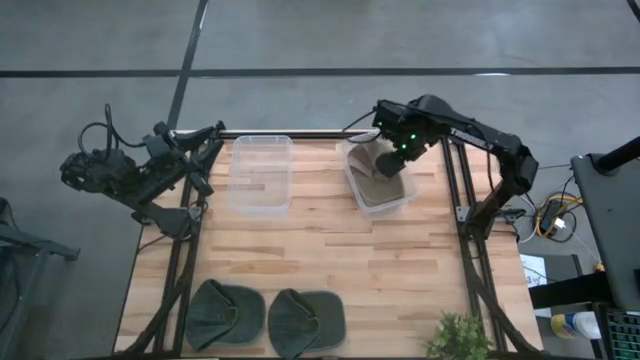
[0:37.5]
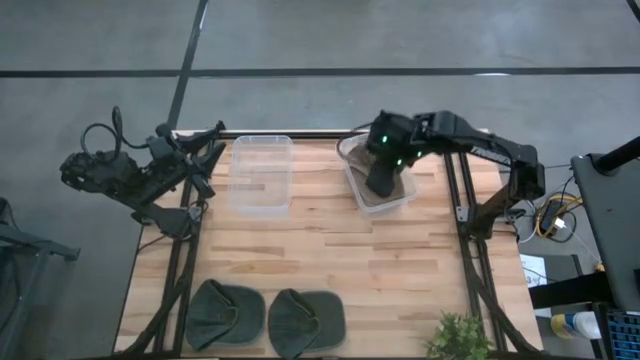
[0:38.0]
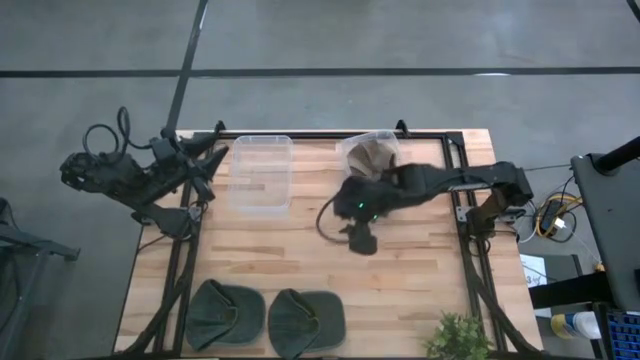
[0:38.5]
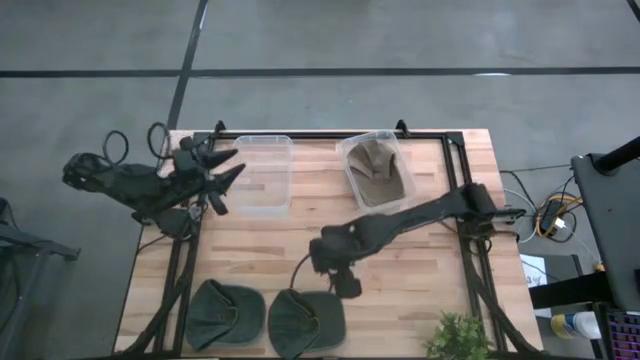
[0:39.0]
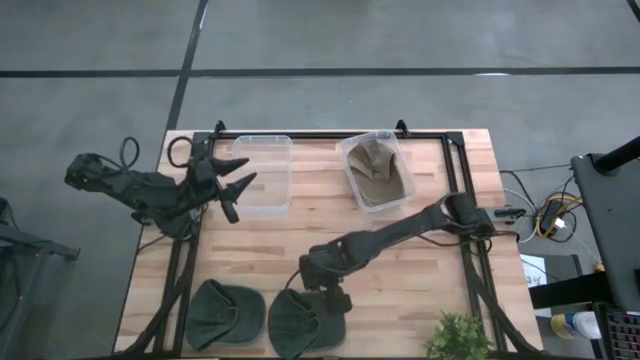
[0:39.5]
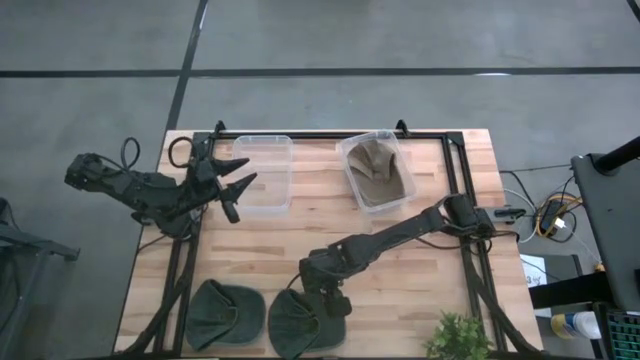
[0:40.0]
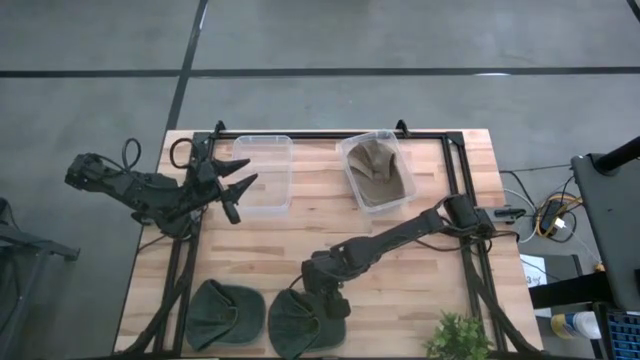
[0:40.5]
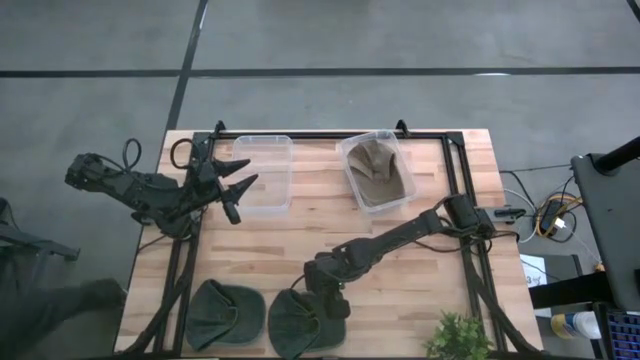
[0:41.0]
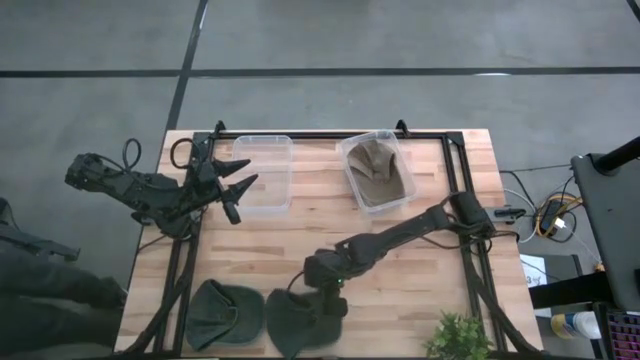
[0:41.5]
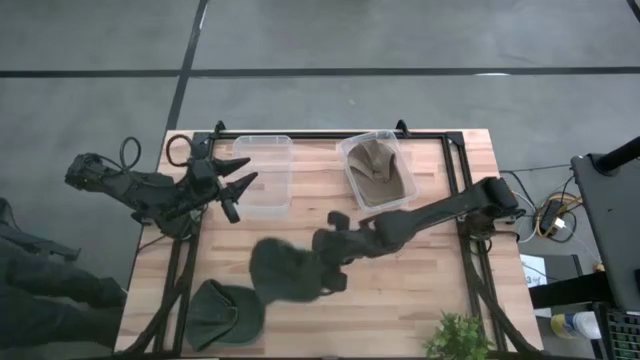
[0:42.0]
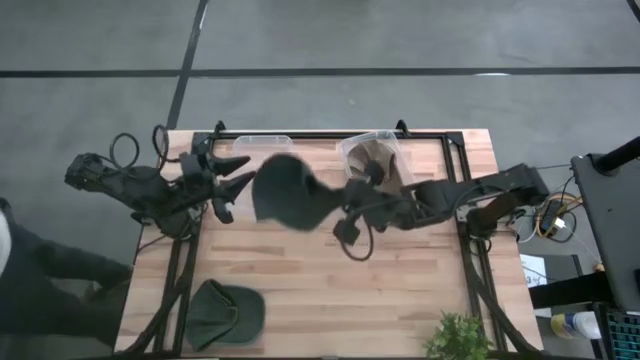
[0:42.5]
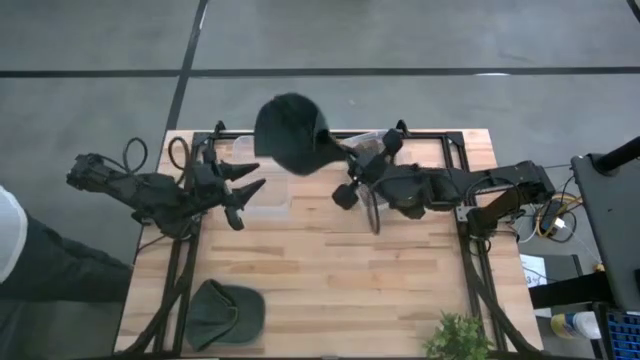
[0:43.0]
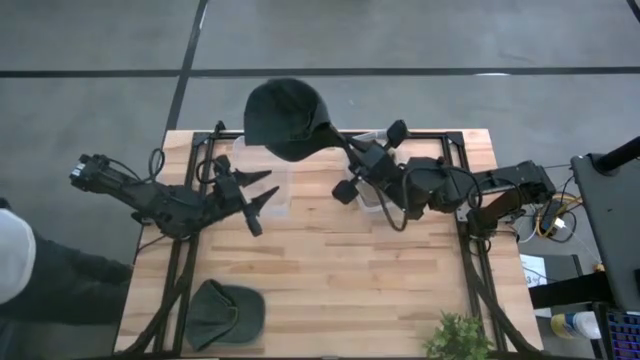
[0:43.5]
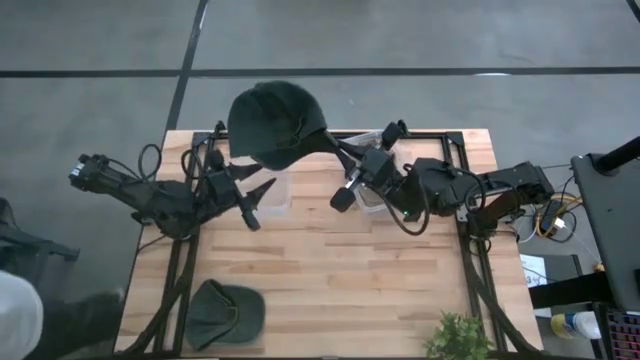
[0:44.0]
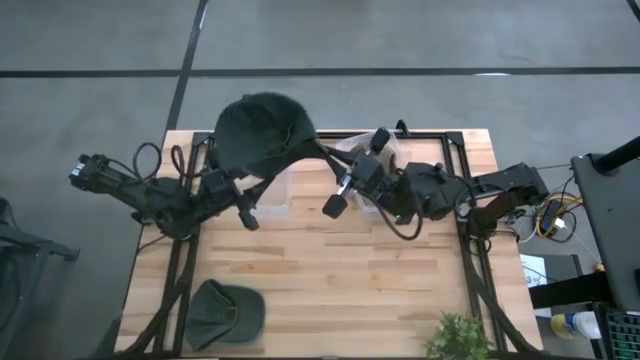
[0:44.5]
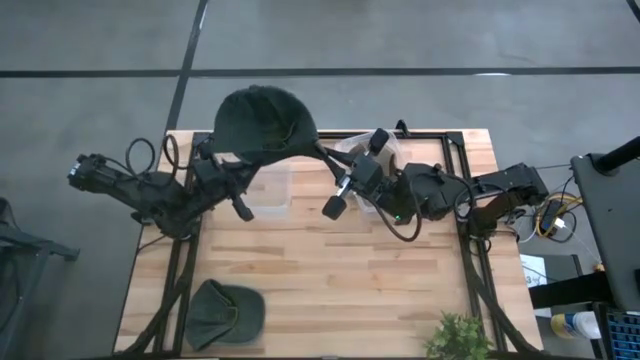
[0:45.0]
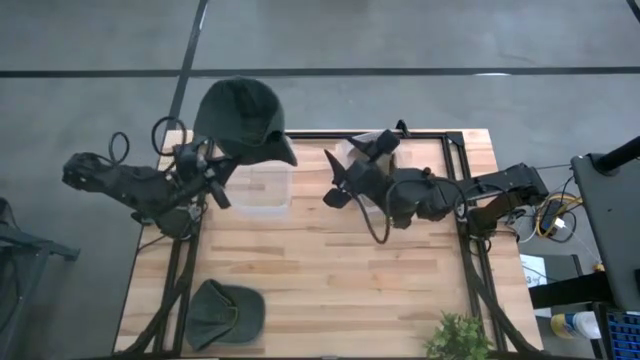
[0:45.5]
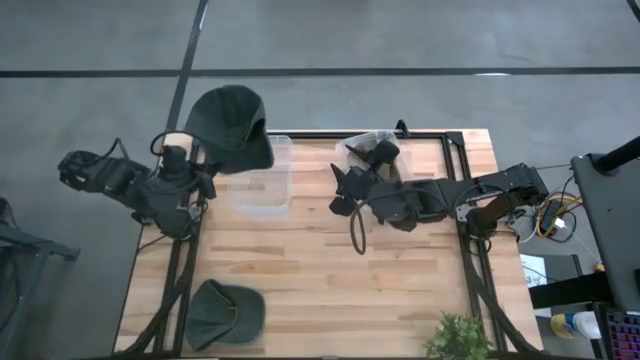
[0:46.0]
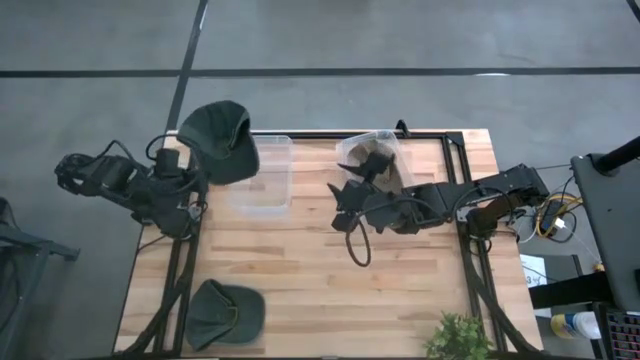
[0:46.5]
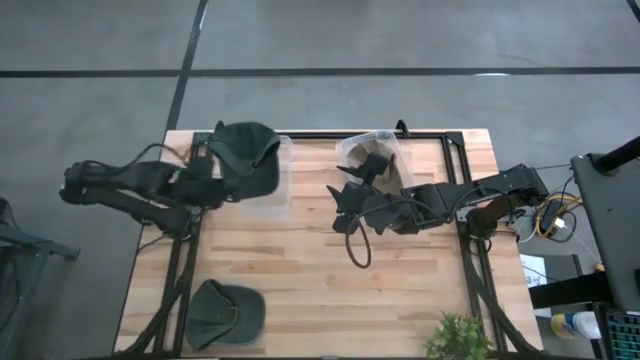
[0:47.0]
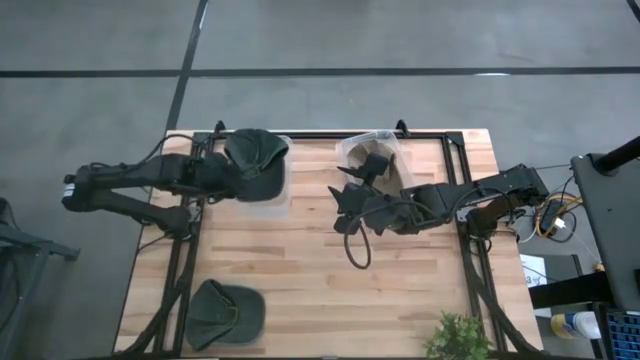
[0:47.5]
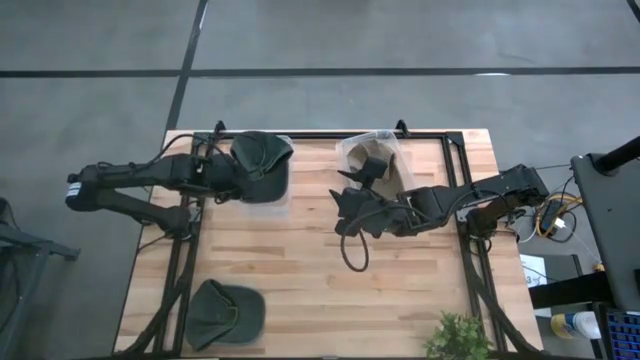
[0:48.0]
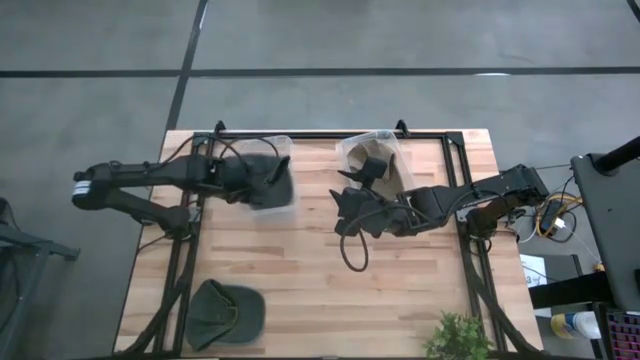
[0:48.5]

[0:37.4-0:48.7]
Task: Pick & Place hat
Put the right black cap into the left transparent bin

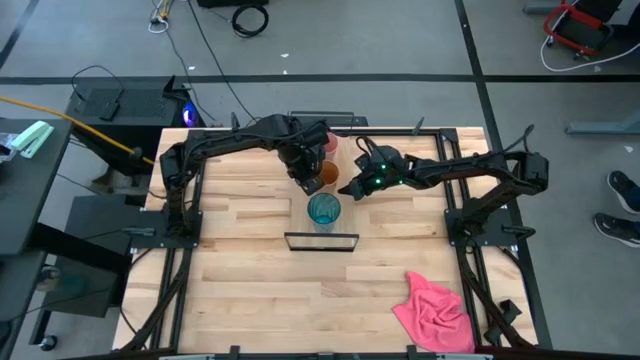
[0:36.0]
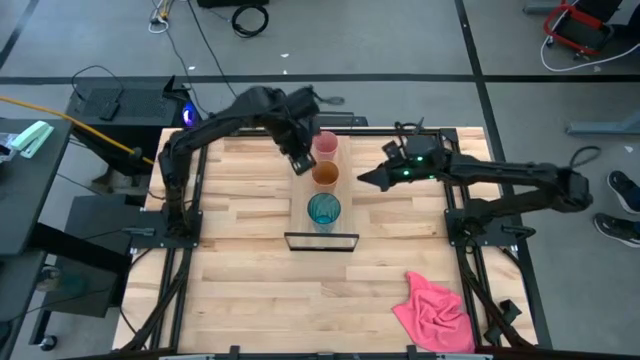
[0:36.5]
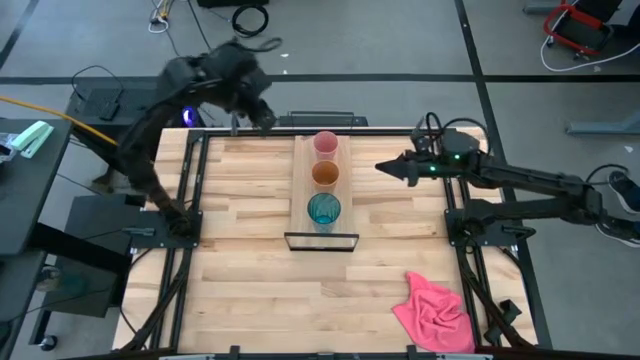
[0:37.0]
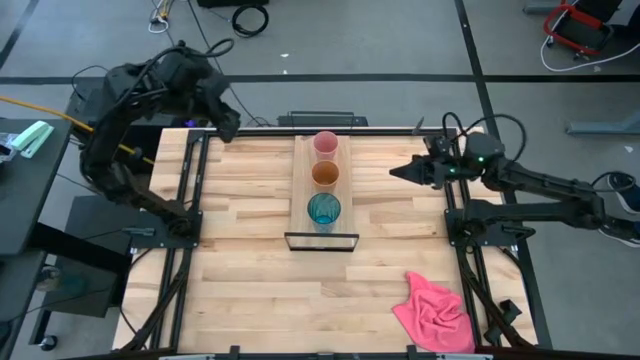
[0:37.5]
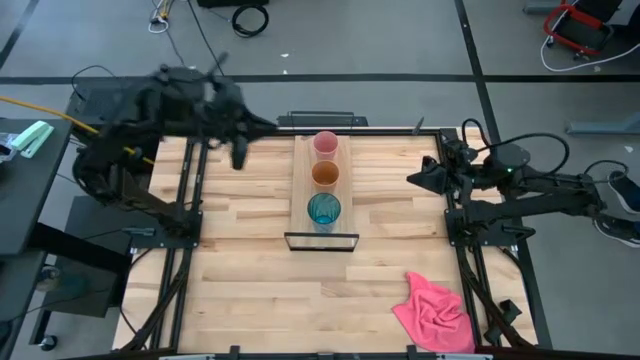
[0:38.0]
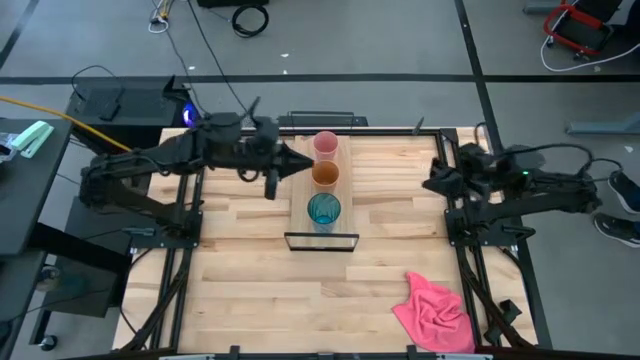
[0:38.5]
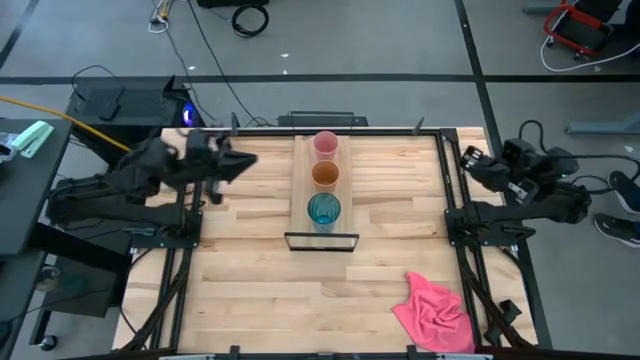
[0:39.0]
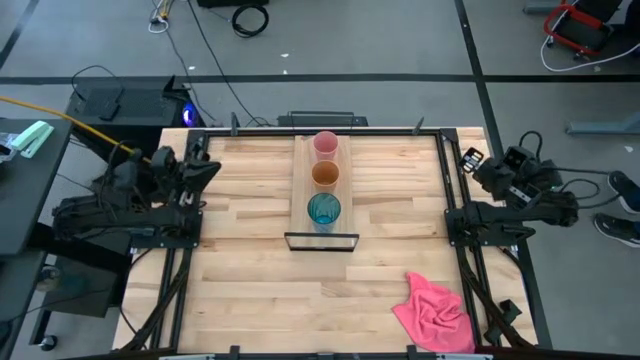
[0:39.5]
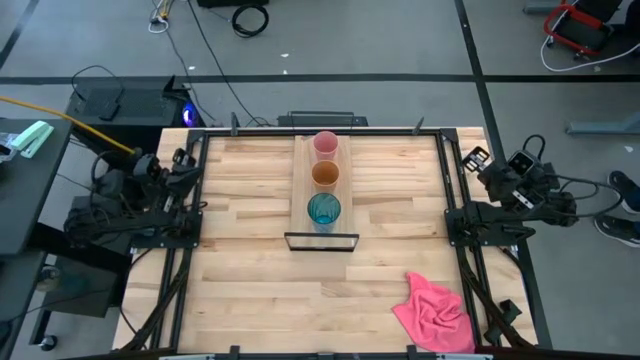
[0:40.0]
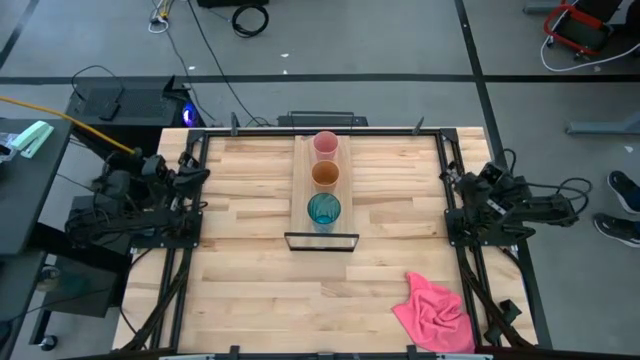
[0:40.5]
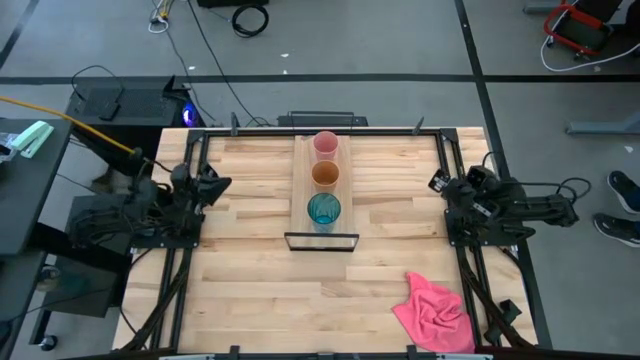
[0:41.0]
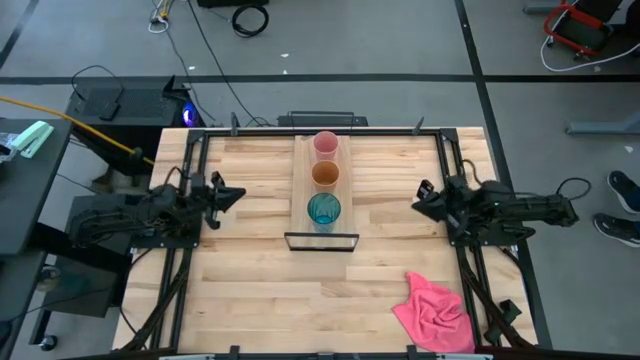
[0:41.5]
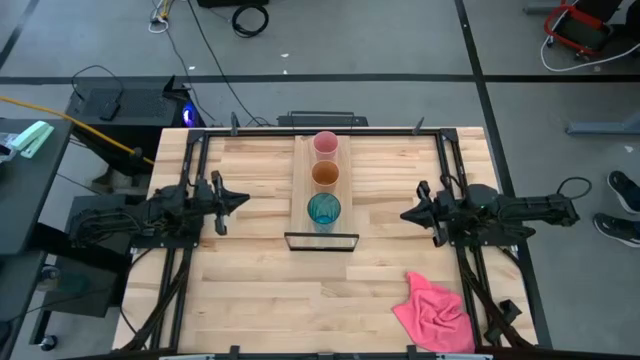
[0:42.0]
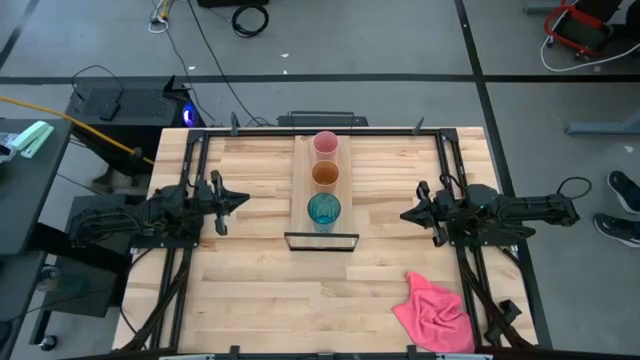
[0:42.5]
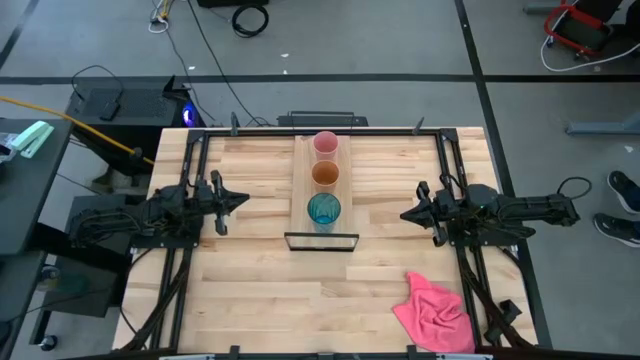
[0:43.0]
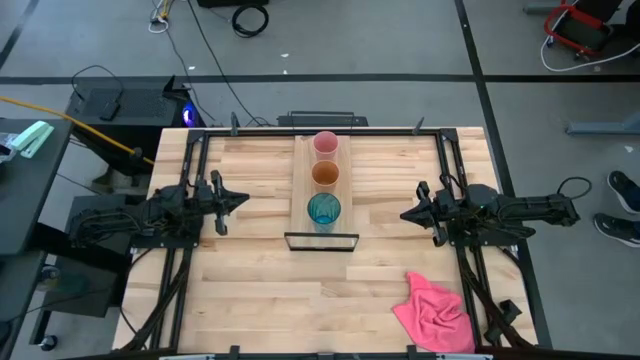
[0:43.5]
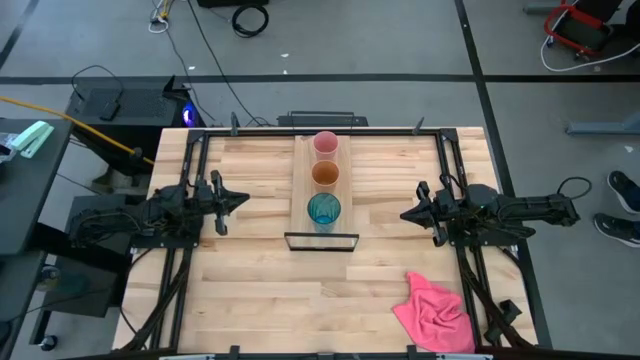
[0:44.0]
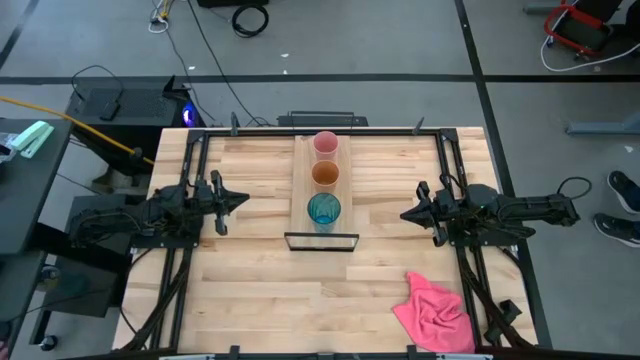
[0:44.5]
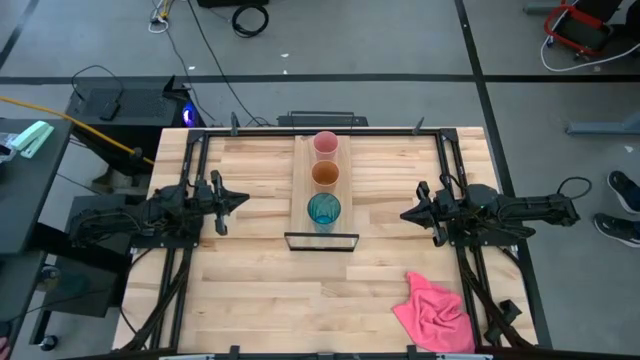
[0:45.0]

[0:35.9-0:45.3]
Task: Stack small to large cups/mugs on shelf
Return to Home Position
